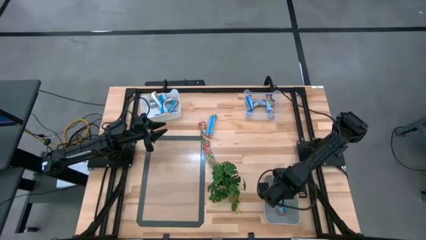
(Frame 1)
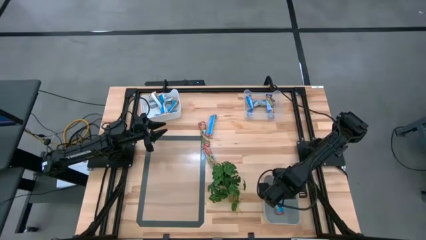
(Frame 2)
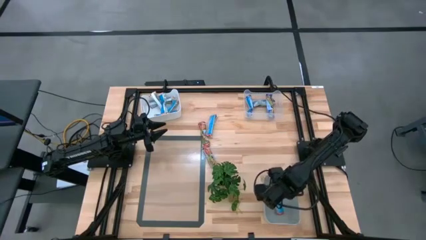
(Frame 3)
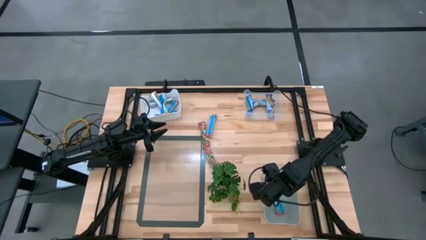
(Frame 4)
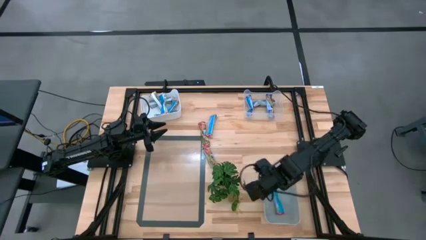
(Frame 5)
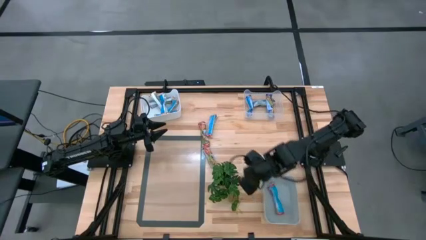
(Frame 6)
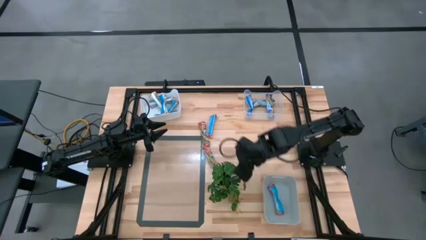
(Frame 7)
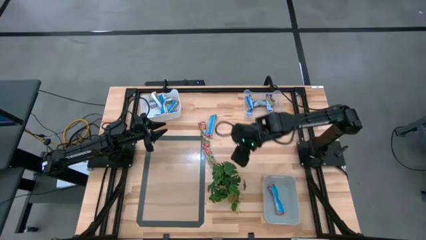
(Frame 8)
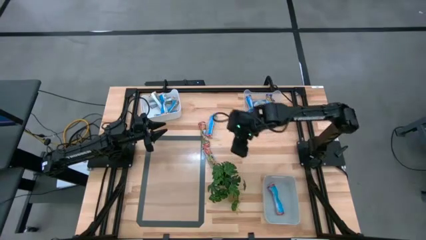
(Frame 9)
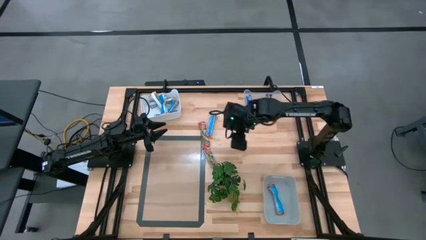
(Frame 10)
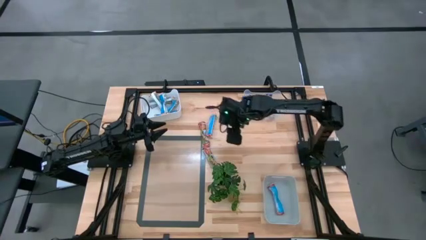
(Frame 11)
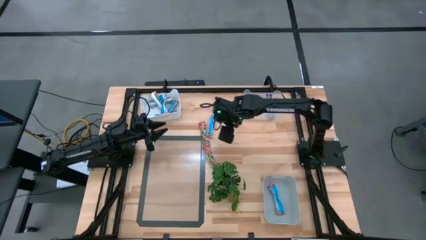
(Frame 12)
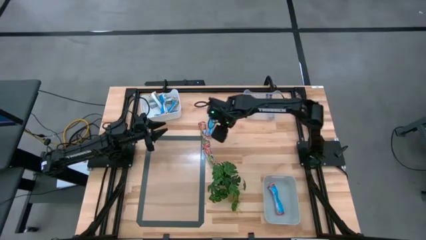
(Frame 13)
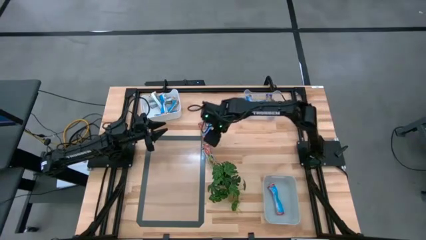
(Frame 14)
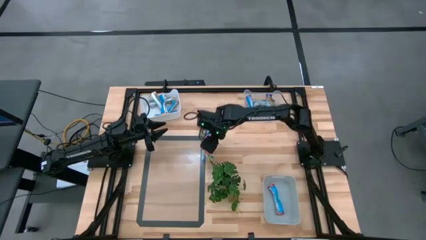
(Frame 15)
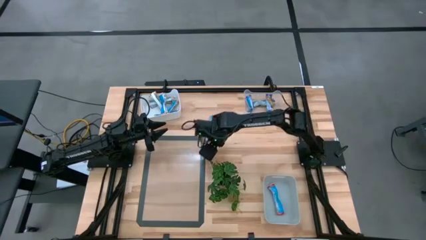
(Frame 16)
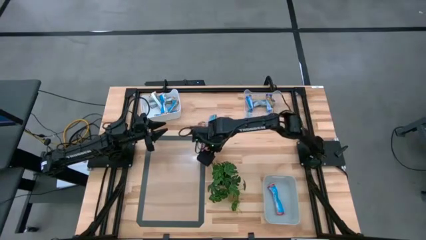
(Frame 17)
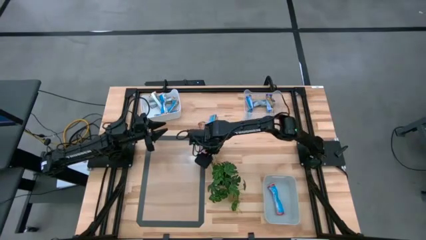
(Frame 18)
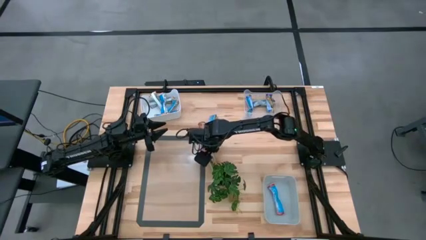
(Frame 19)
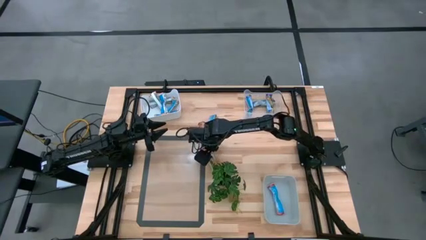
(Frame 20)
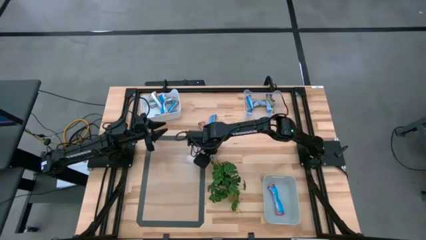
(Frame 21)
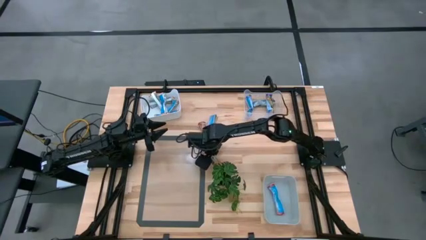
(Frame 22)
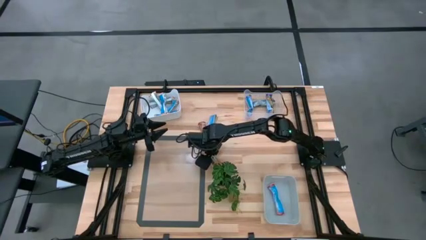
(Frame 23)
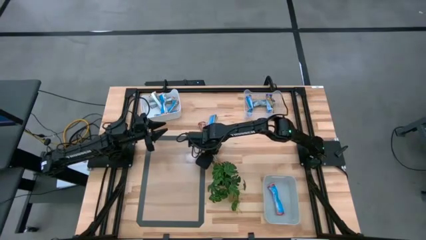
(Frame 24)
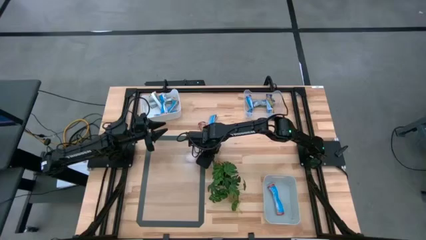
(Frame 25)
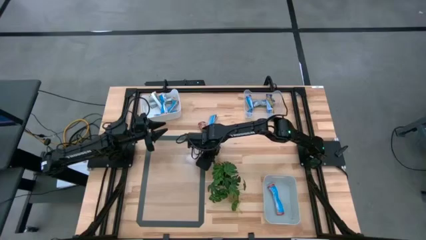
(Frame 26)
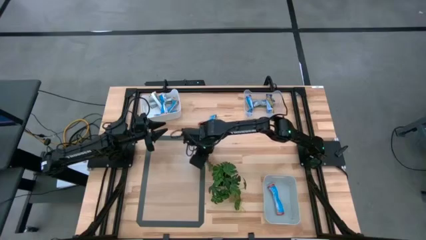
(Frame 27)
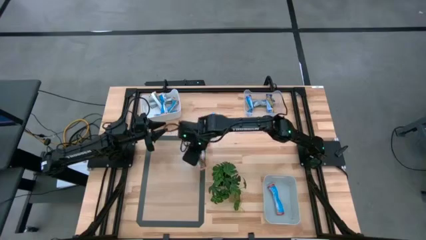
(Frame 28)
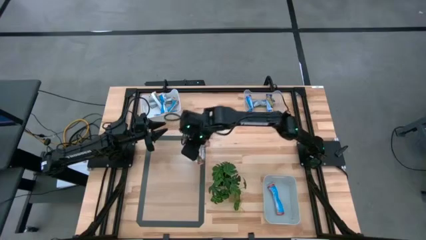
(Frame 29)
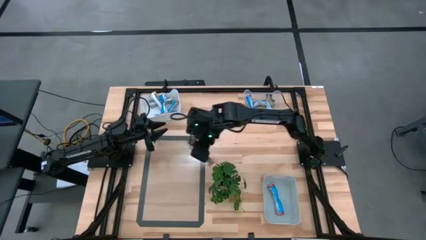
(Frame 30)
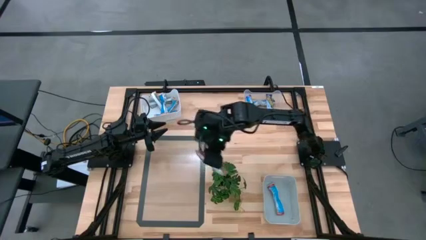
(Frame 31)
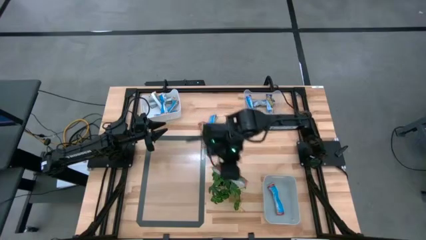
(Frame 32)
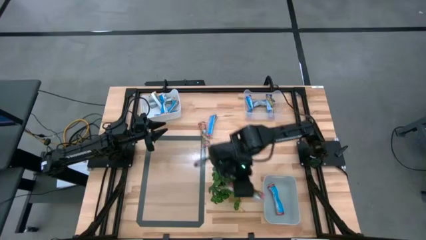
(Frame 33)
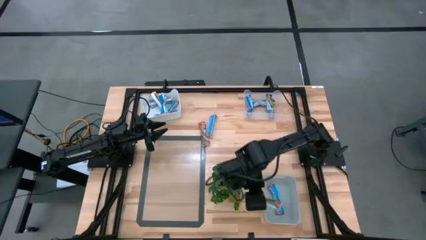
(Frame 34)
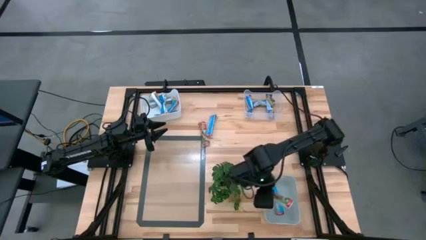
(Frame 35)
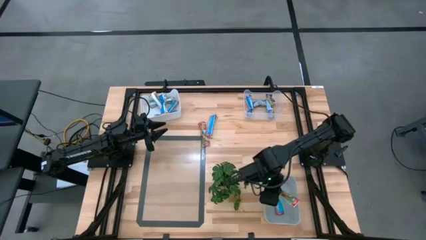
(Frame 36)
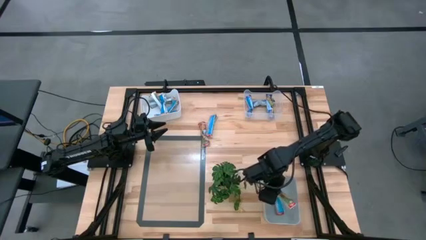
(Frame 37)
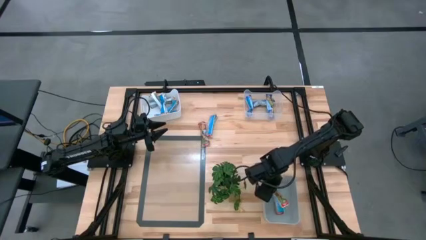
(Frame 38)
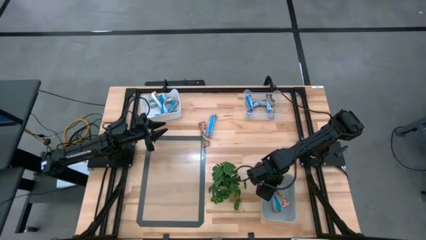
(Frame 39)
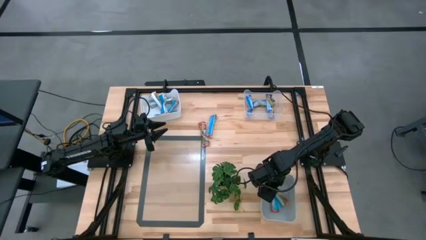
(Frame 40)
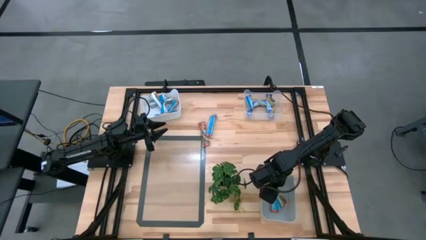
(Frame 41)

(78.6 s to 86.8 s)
Task: Pick and place Granola Bars by type
Put the red granola bar into the gray bin

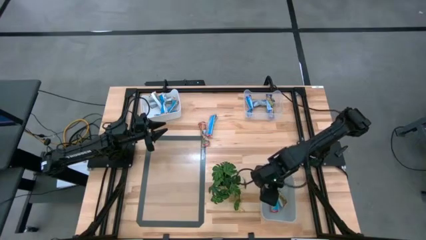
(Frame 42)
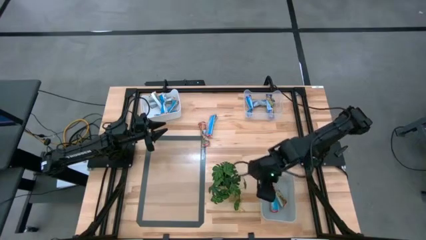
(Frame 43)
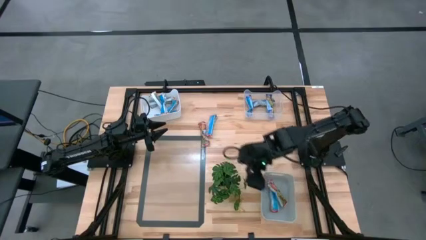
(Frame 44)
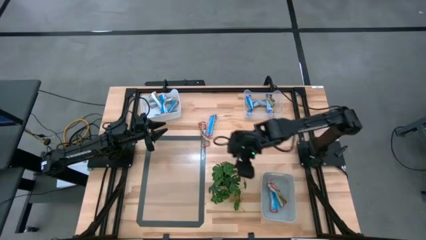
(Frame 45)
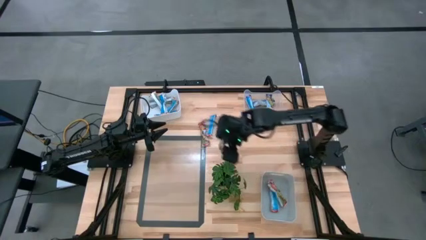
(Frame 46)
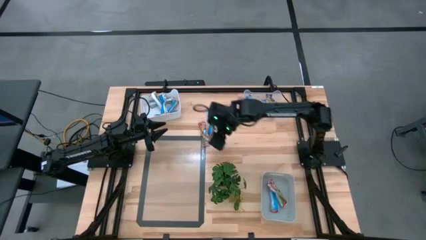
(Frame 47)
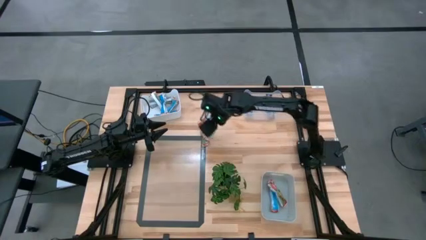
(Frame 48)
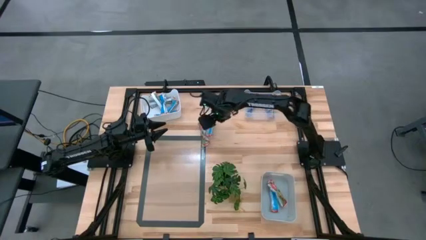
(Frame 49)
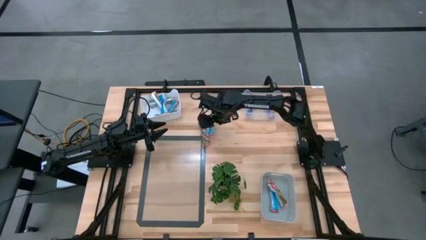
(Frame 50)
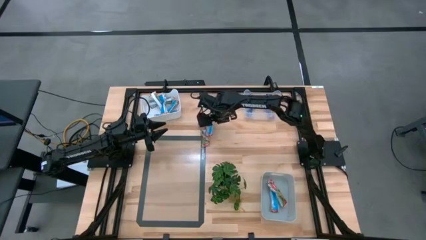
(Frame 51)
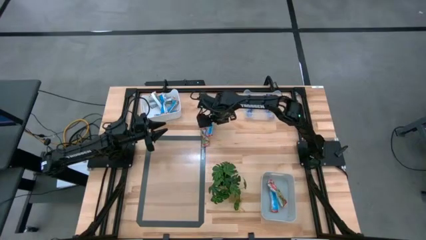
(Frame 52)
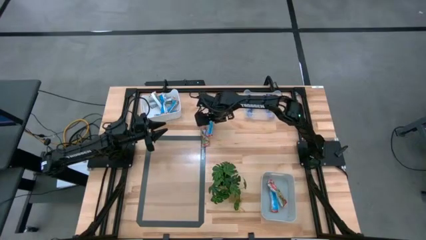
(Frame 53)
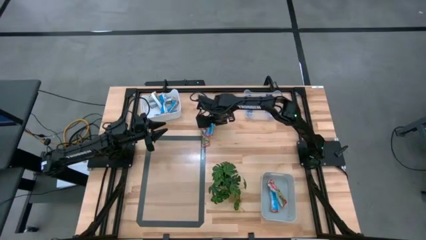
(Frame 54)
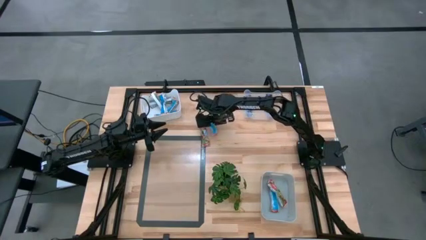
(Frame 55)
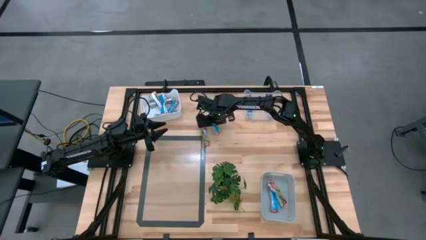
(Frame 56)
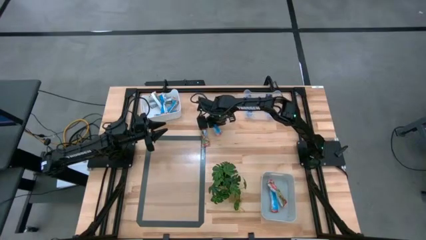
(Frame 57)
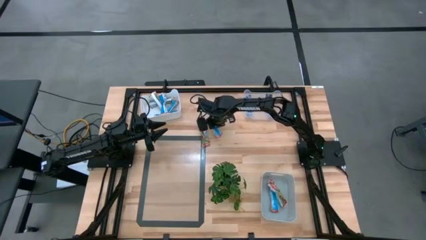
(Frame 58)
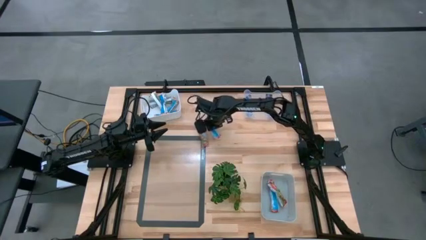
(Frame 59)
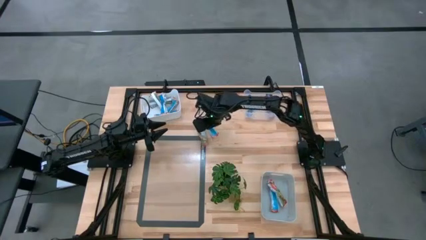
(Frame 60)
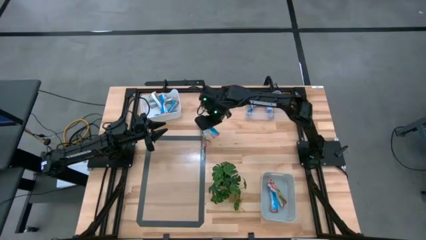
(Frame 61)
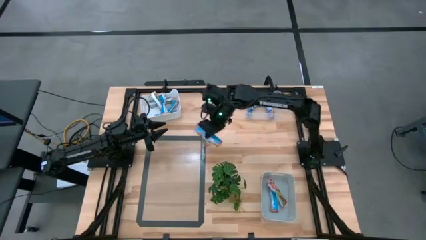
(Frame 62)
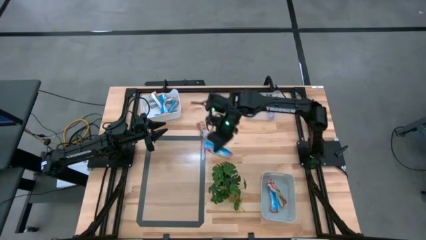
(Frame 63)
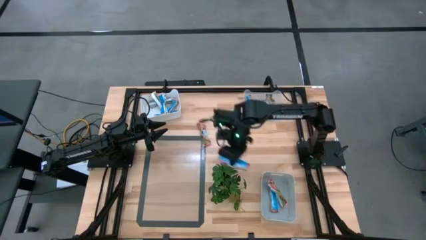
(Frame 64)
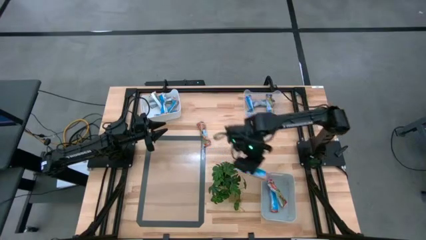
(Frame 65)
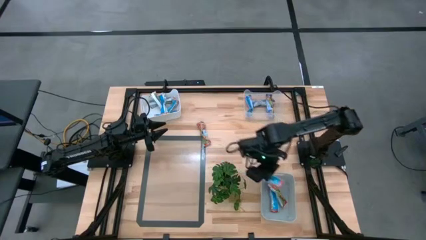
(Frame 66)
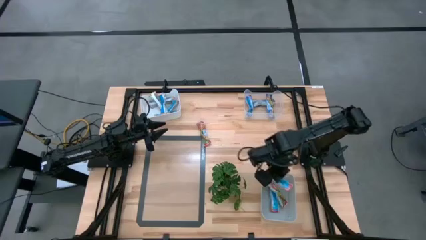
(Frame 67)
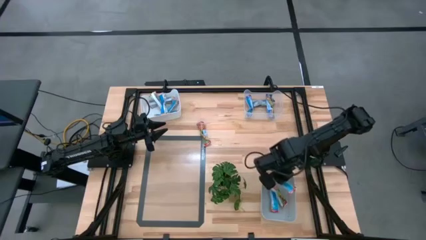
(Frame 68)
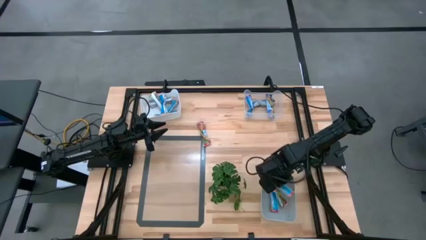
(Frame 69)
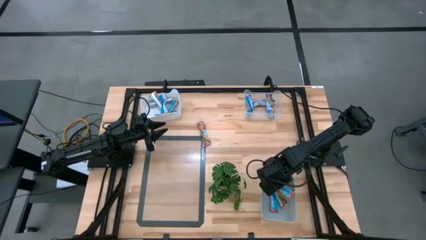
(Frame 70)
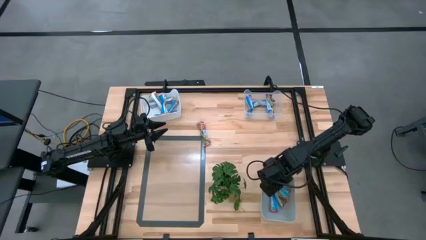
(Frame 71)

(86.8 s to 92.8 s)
Put the red granola bar into the gray bin
